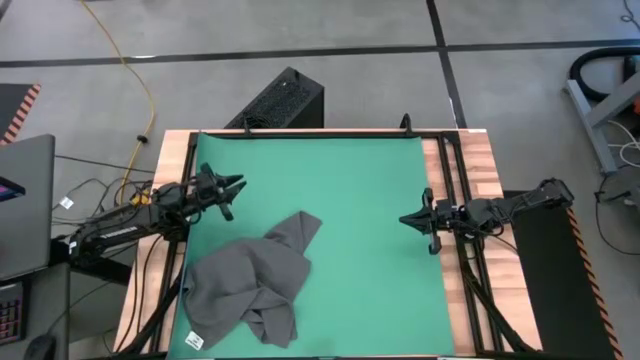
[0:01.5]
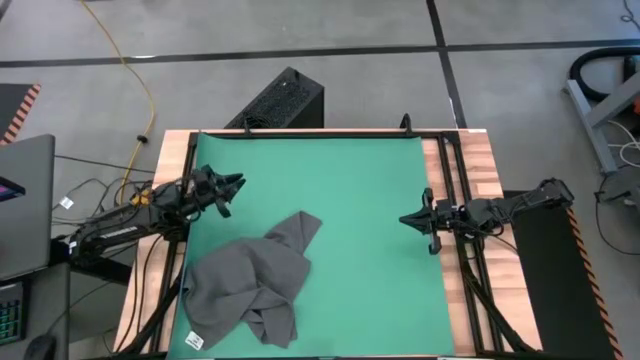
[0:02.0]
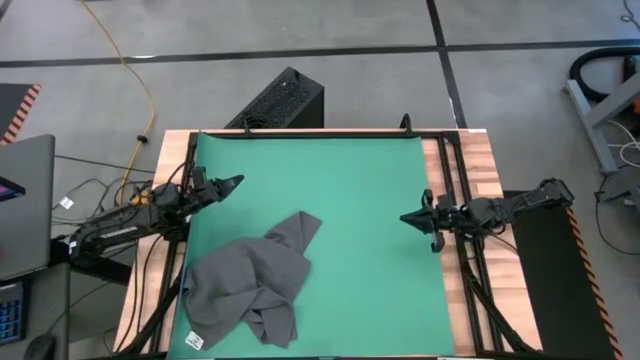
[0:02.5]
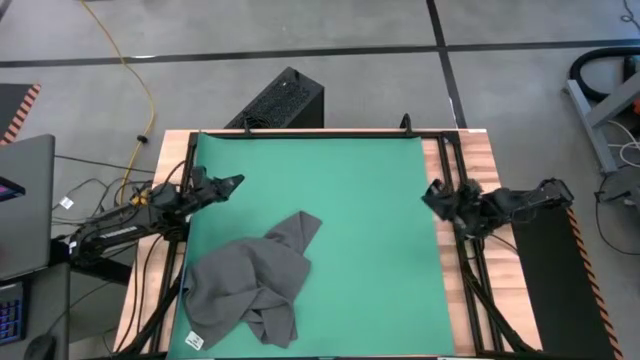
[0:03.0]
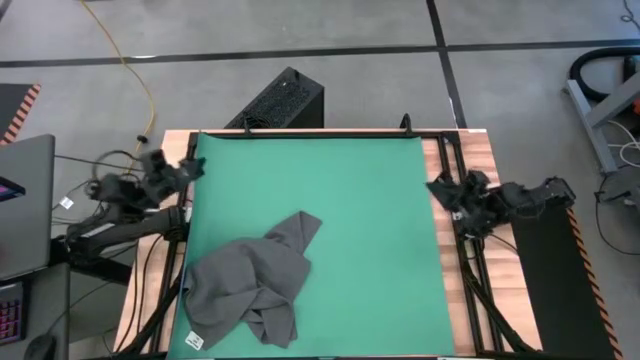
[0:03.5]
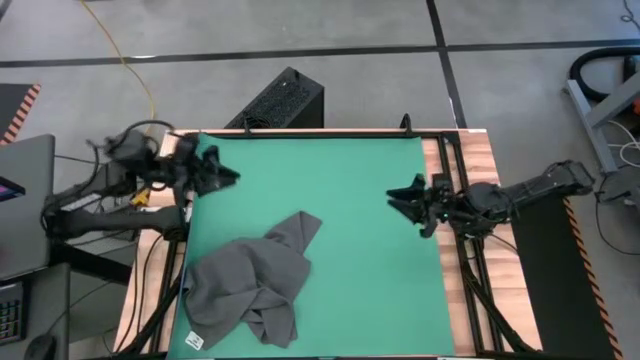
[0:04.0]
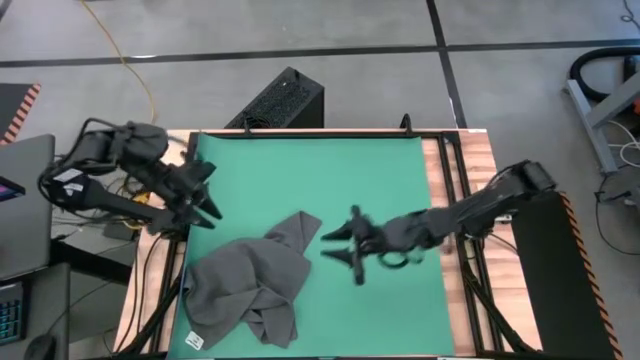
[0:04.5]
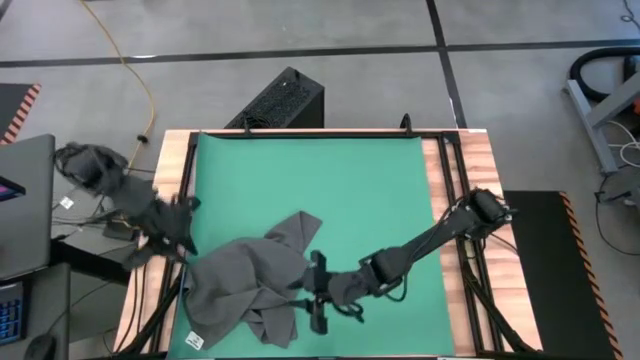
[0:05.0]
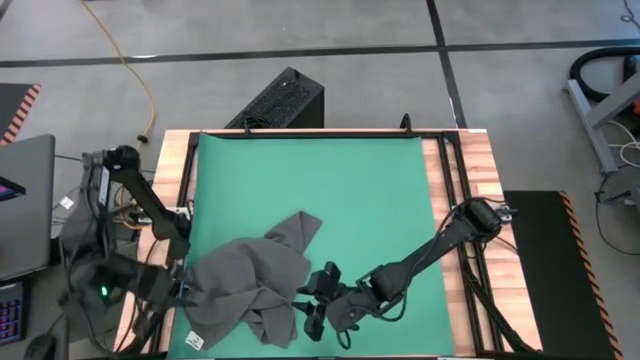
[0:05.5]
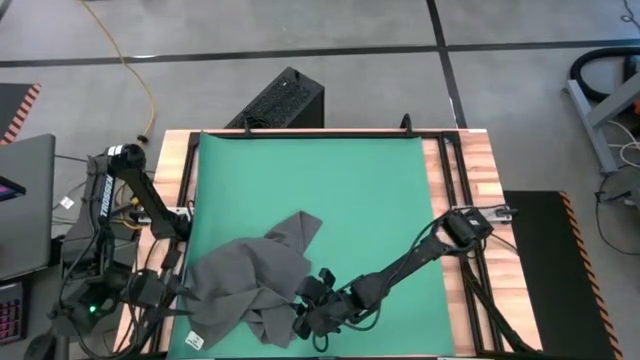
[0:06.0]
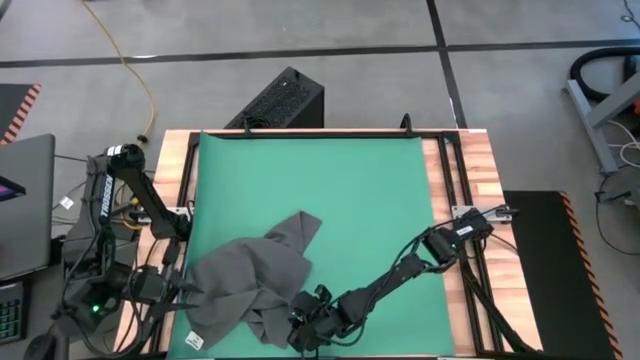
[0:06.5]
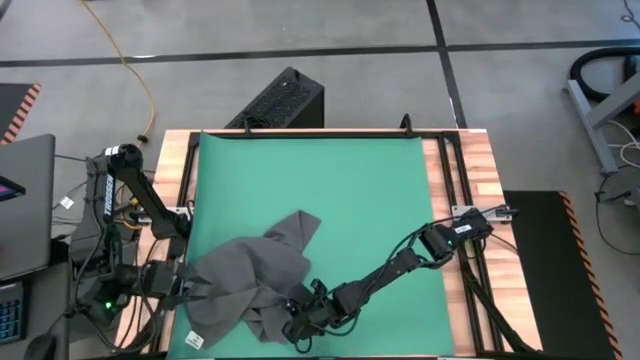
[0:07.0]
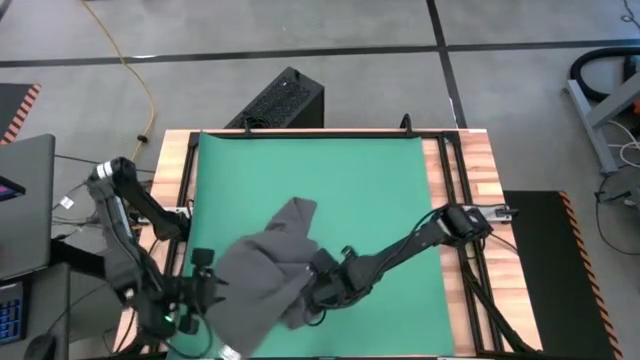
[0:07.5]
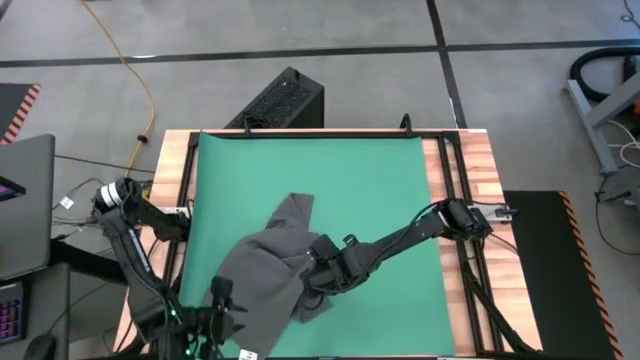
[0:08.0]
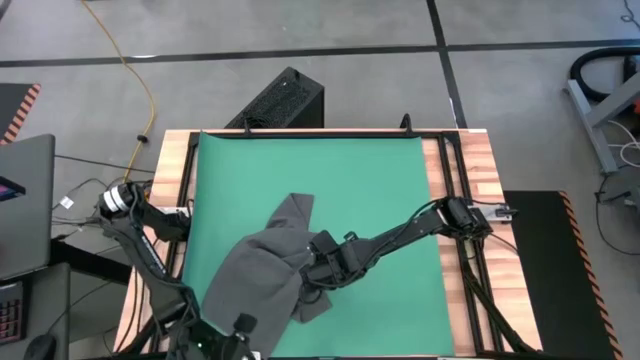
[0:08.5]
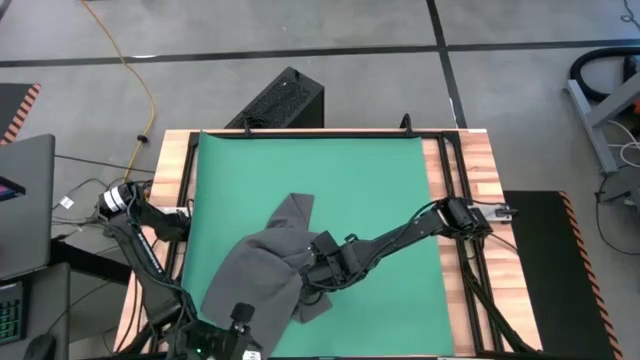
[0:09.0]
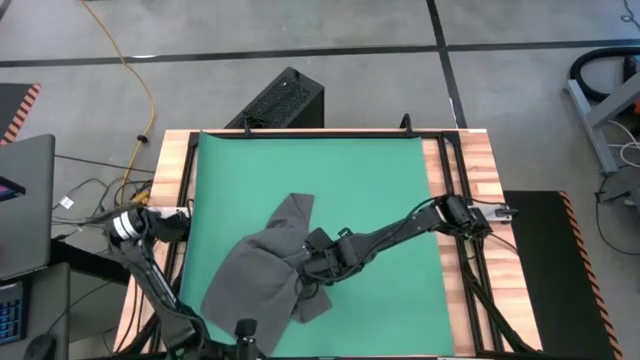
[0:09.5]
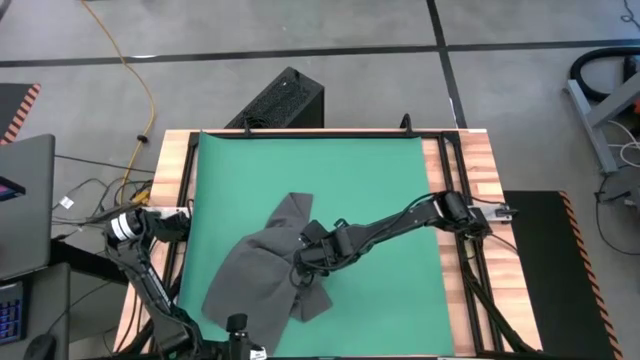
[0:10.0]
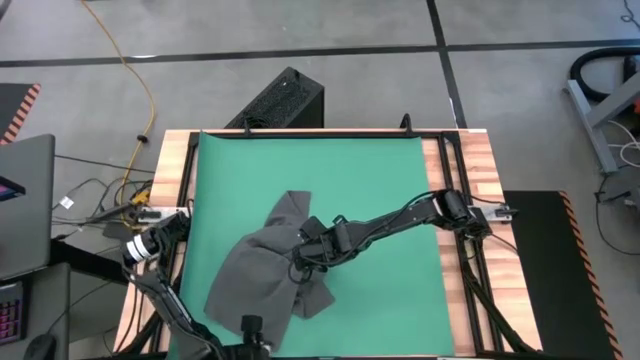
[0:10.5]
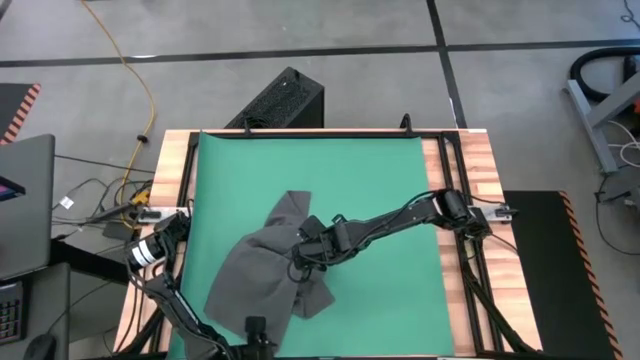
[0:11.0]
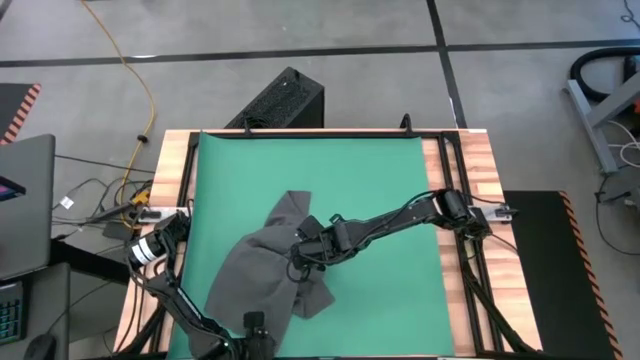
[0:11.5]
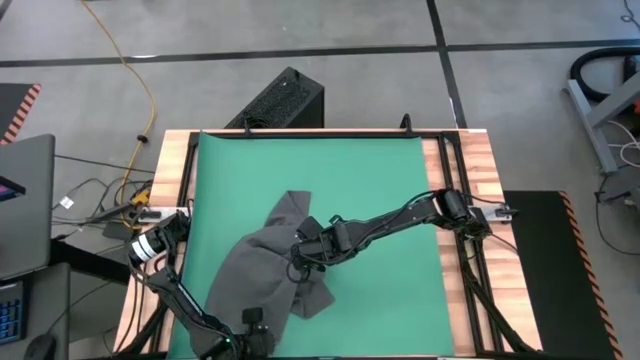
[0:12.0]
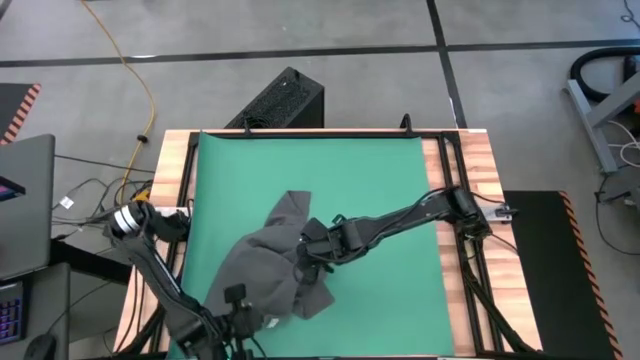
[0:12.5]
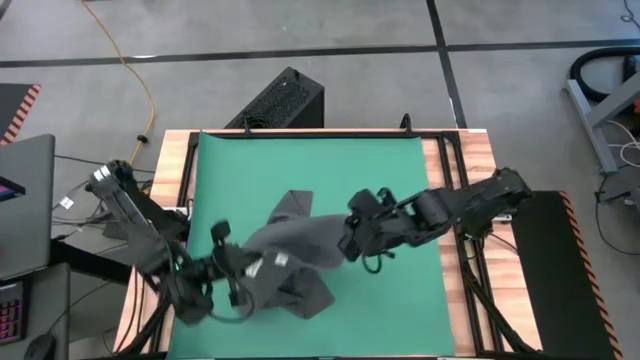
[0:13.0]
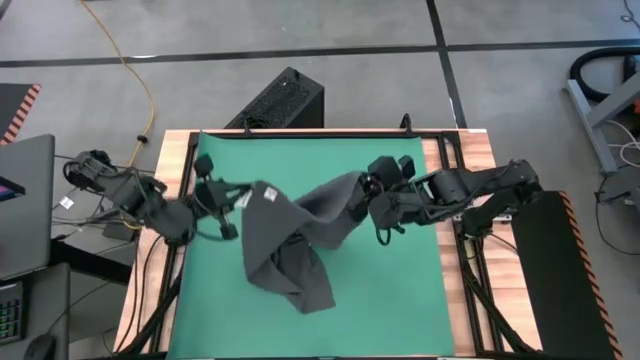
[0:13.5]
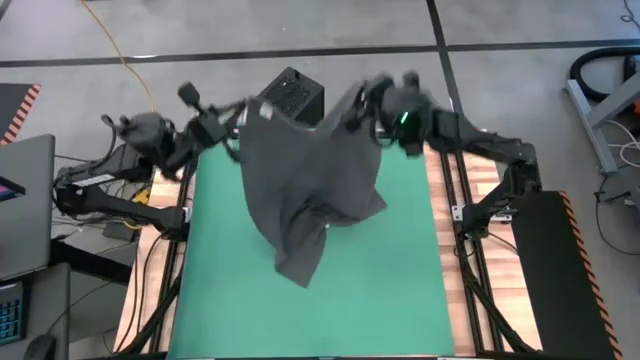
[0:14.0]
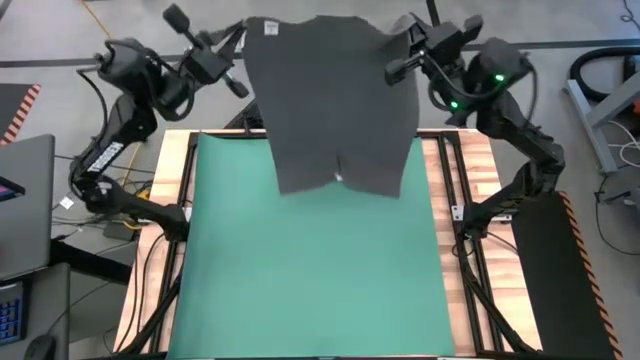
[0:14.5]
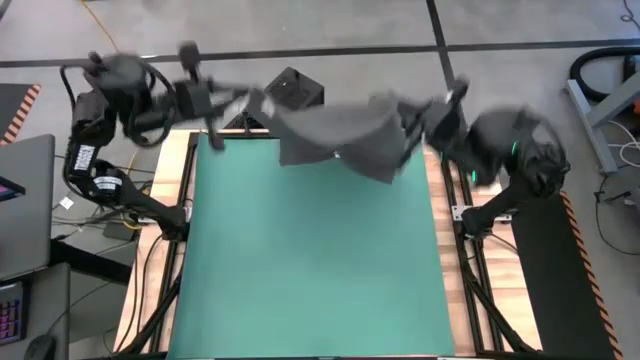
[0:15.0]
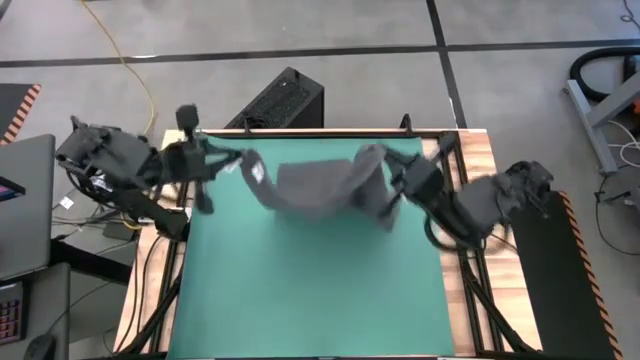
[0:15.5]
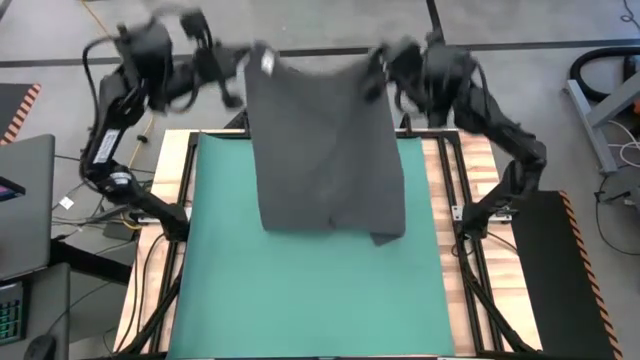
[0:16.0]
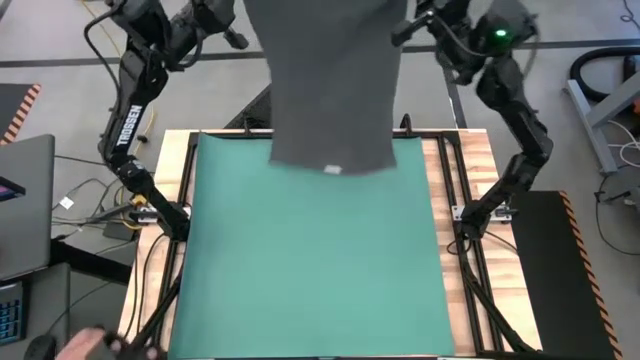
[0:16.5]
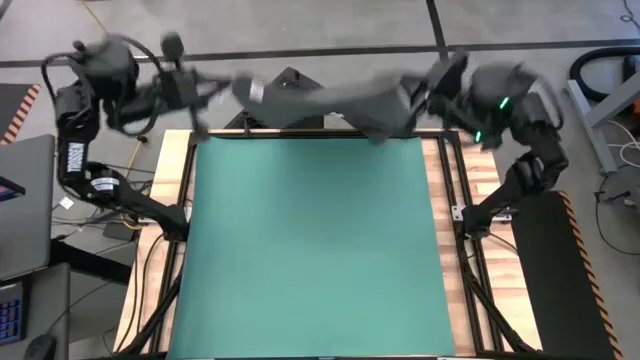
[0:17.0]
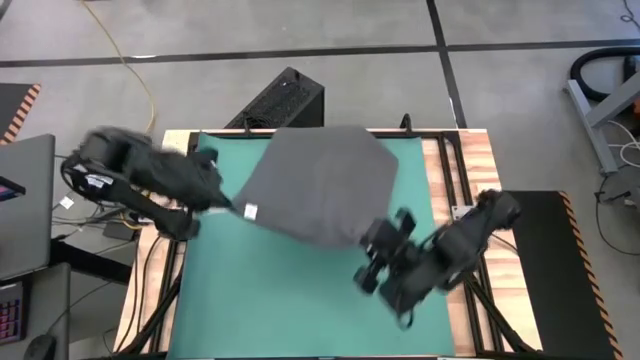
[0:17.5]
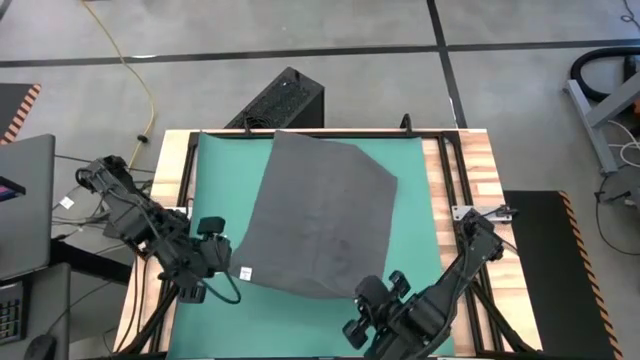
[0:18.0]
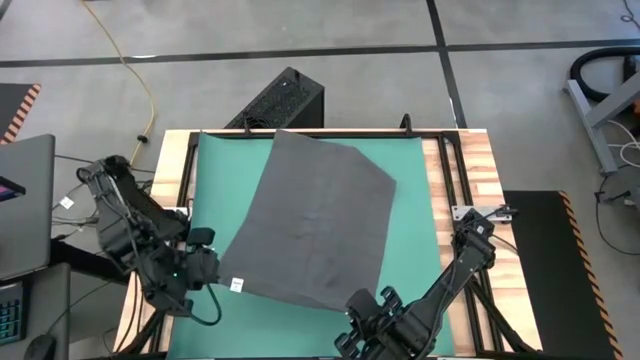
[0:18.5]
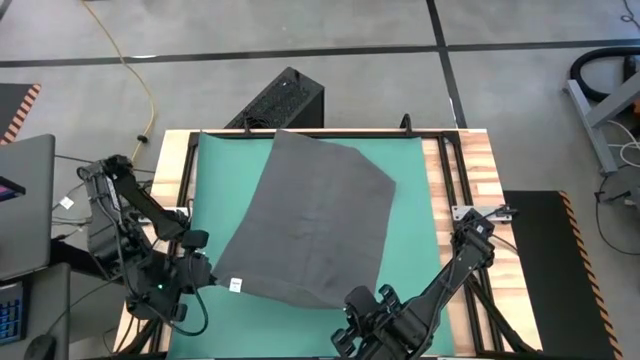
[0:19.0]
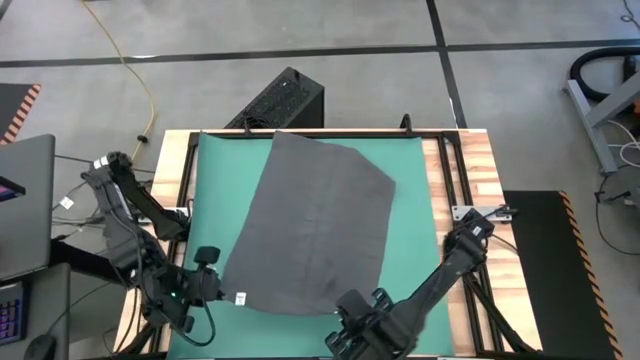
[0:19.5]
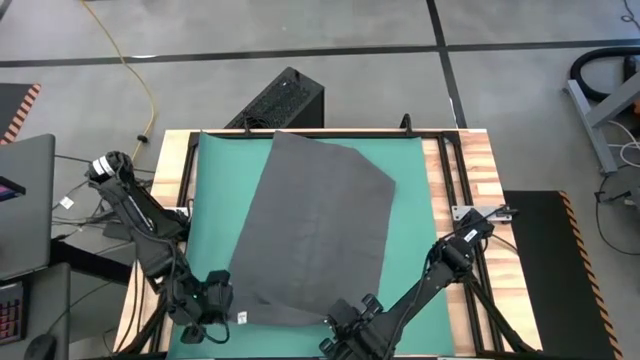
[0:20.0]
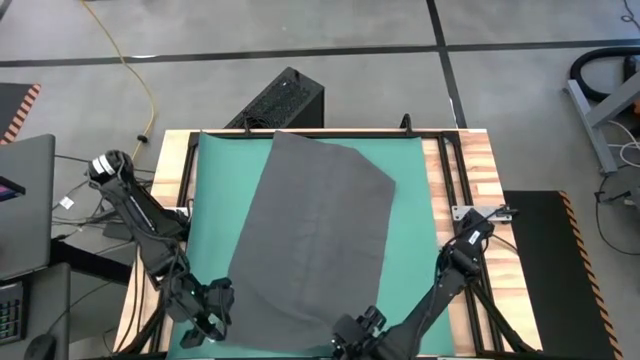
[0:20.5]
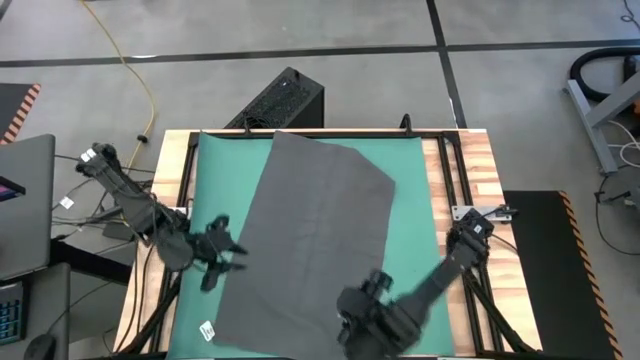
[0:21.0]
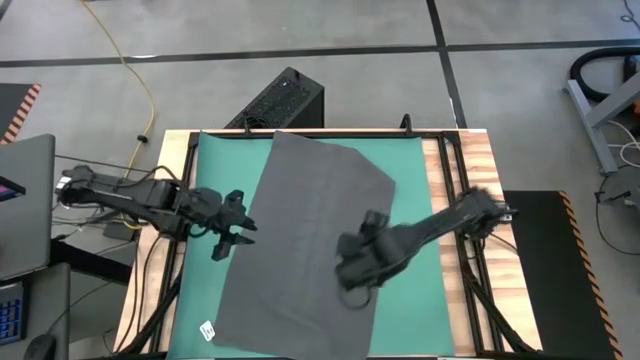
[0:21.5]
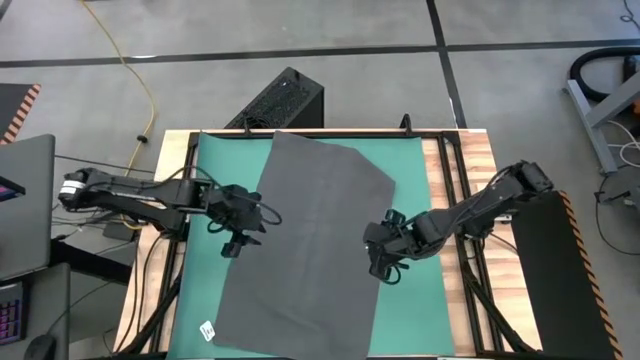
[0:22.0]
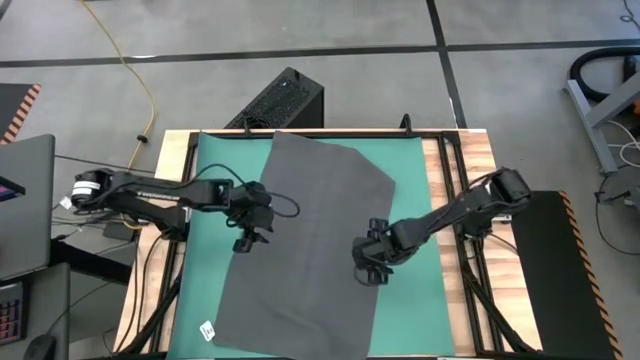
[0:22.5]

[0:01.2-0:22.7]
Task: Roll towel into tight, uniform cylinder
Roll the gray towel
